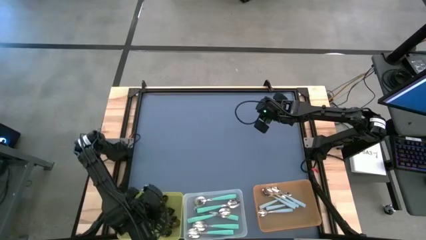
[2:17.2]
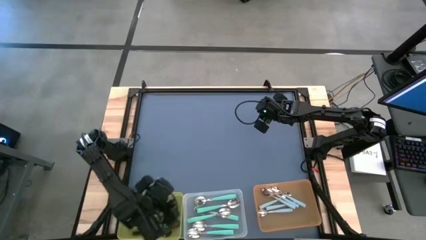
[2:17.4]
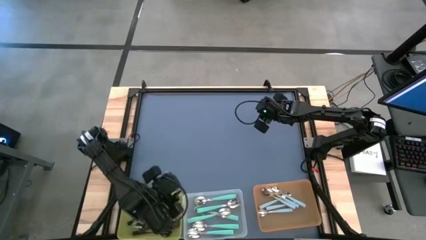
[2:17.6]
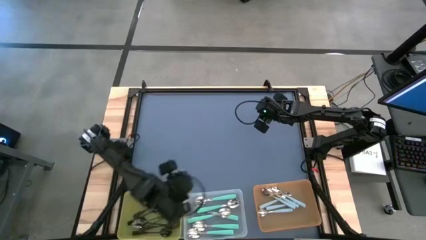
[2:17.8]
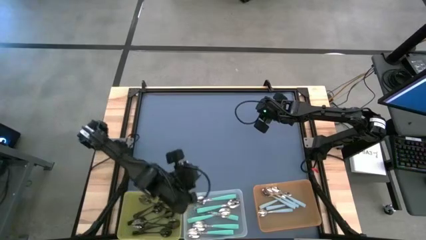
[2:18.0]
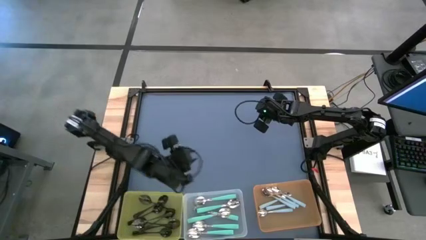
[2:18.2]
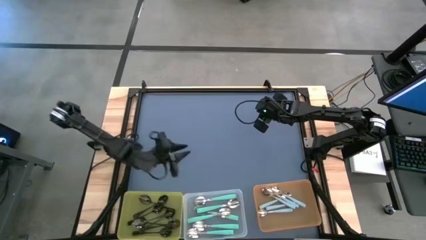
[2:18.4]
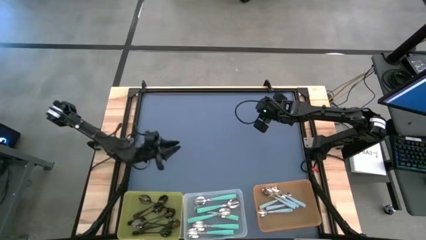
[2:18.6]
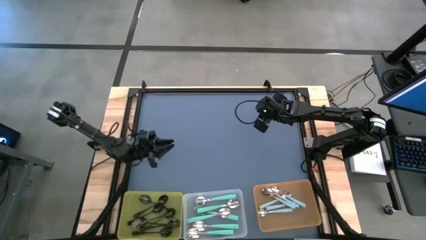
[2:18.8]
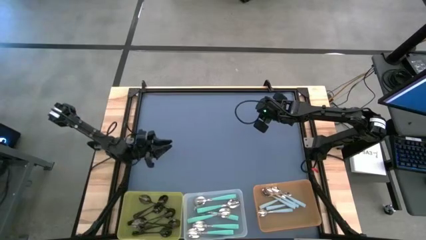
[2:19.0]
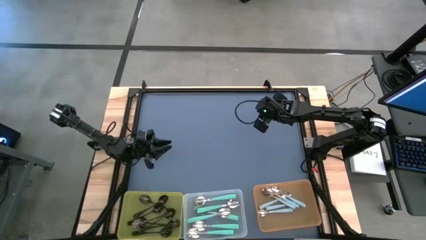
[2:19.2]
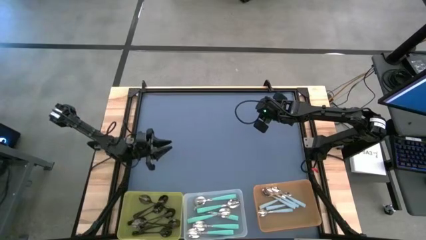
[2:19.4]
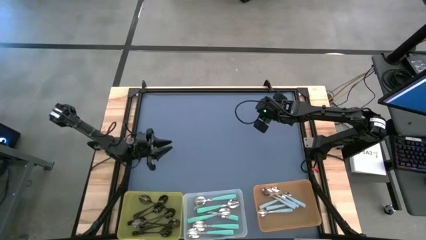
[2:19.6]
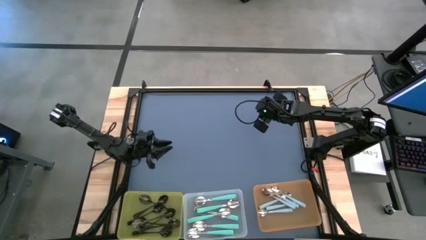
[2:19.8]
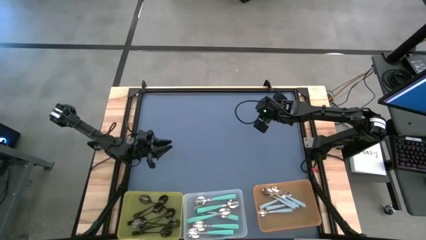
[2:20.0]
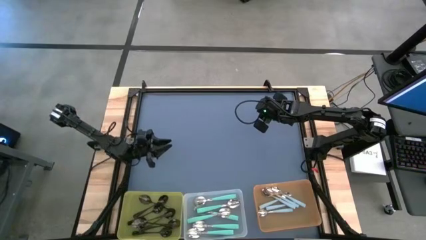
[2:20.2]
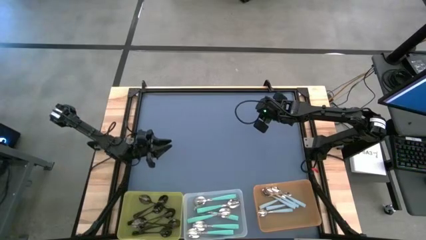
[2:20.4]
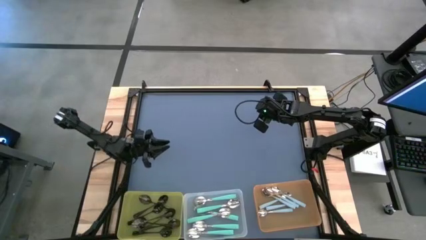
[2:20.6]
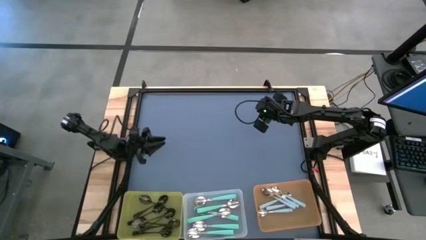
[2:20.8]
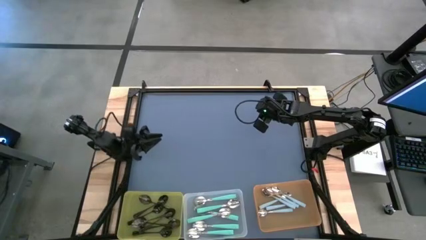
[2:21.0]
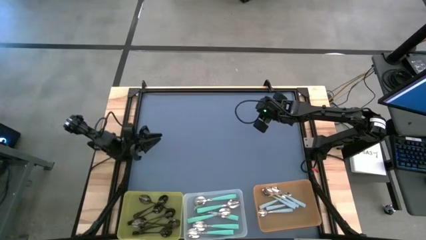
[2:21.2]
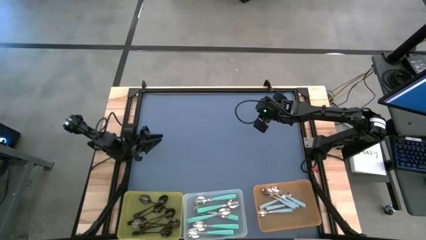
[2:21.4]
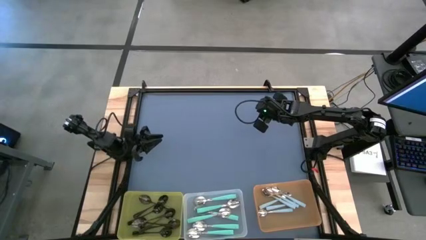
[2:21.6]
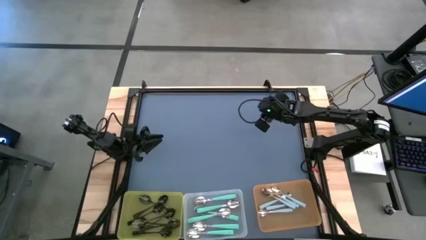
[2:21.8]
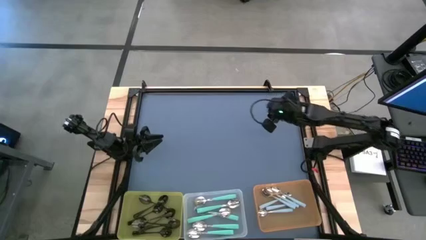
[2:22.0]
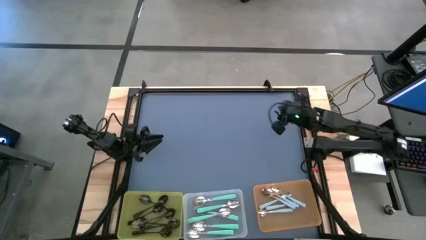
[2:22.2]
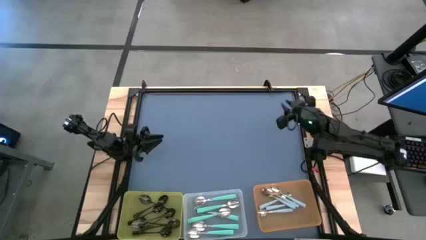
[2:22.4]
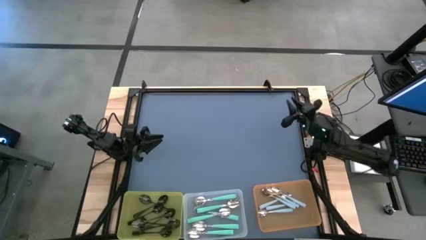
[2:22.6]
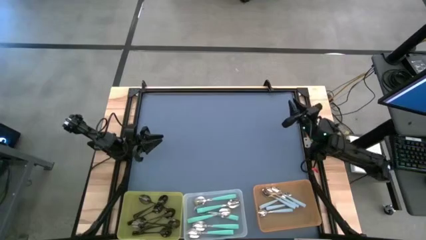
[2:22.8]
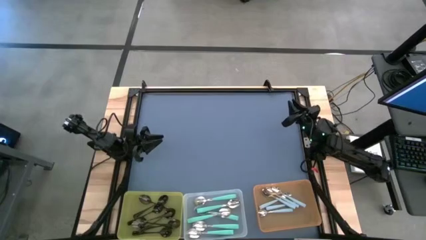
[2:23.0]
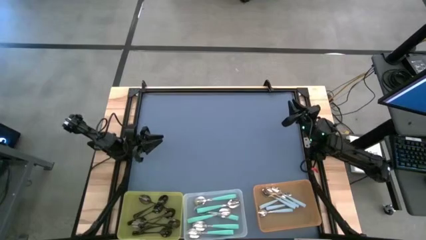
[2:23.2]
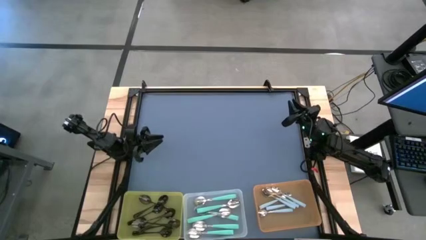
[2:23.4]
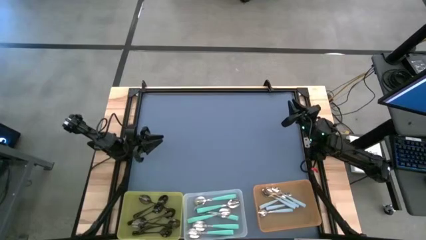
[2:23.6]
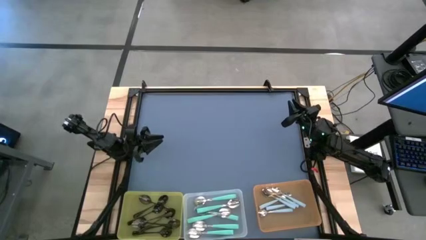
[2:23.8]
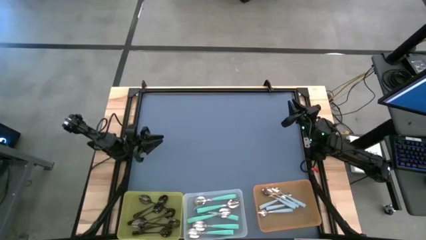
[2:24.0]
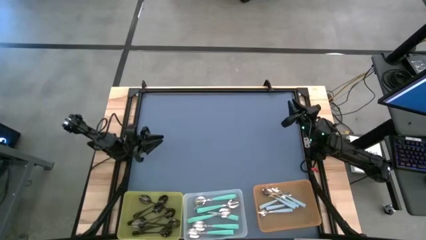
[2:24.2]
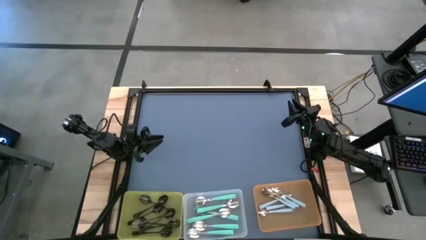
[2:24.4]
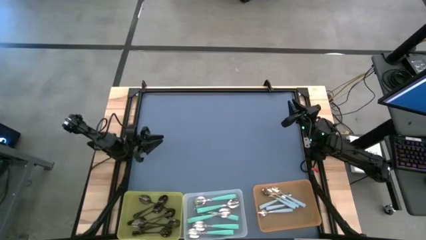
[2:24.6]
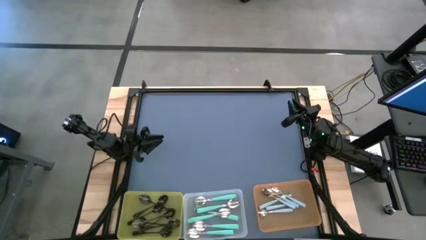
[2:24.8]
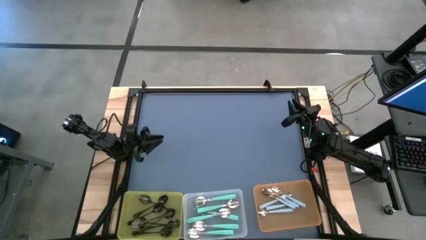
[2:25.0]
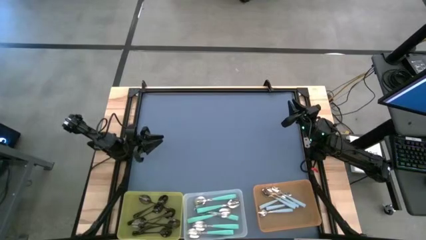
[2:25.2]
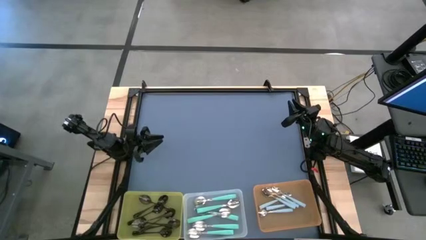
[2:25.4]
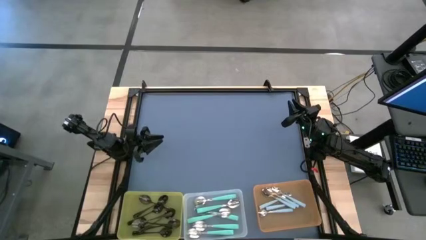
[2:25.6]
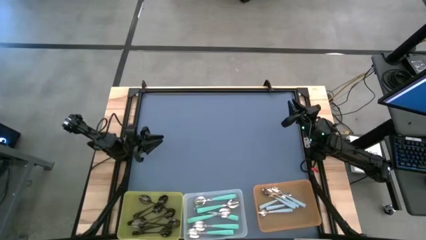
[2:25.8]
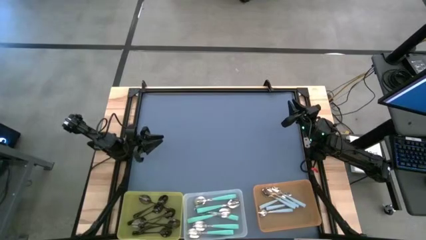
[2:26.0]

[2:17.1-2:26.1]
Task: Sort silverware by color (type)
Return to Home Position

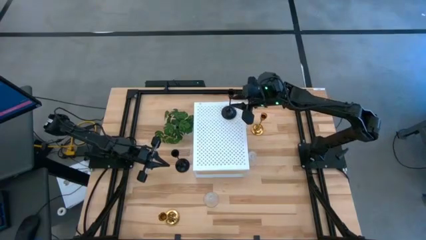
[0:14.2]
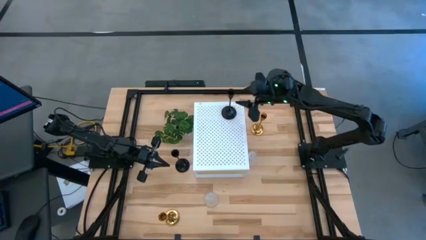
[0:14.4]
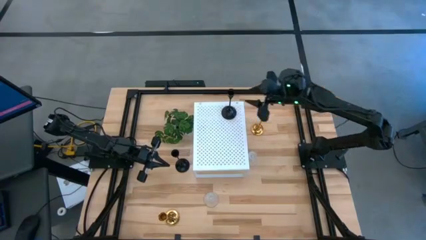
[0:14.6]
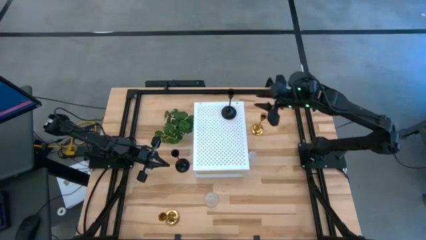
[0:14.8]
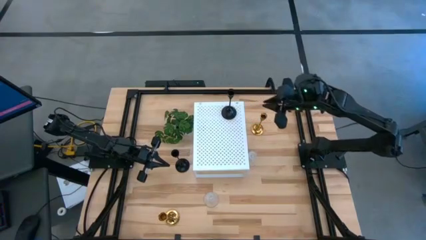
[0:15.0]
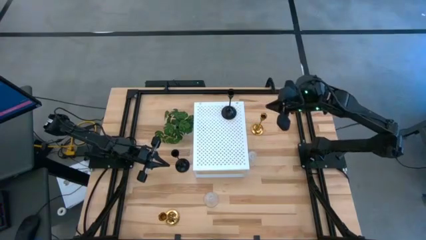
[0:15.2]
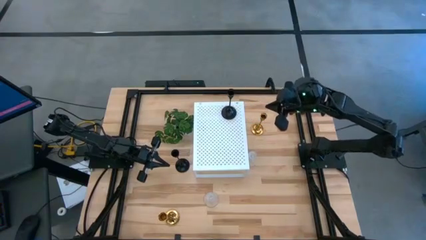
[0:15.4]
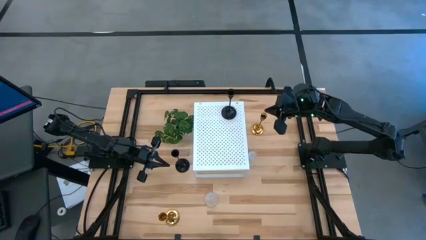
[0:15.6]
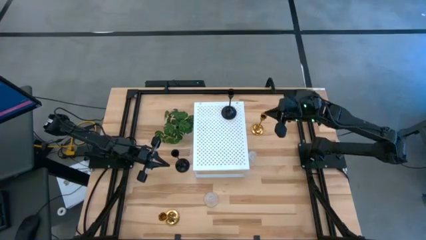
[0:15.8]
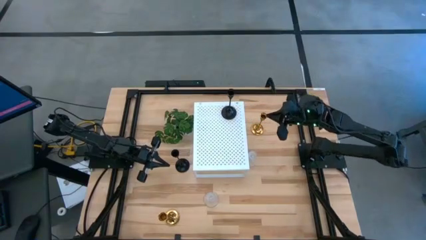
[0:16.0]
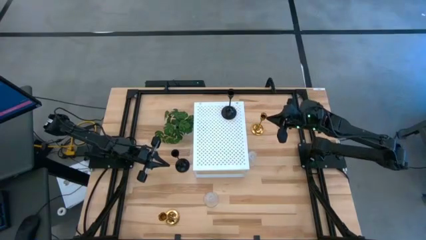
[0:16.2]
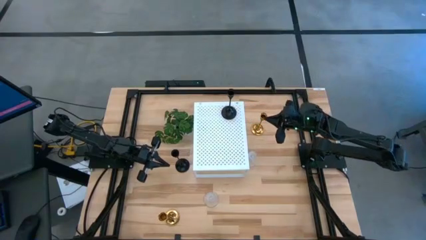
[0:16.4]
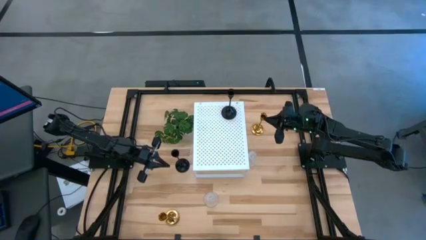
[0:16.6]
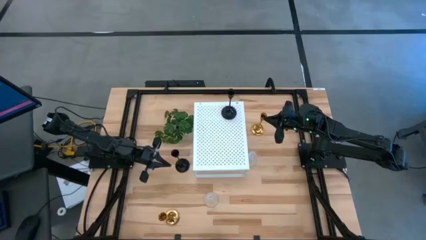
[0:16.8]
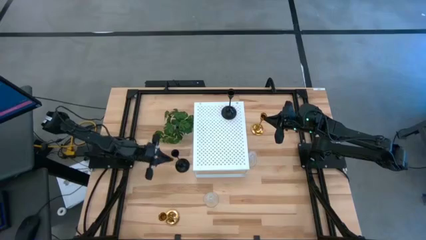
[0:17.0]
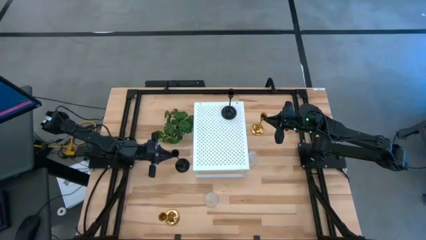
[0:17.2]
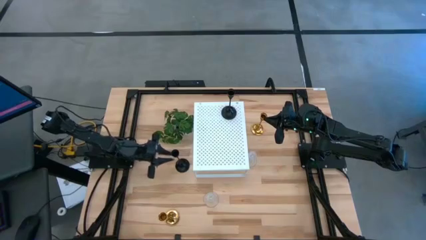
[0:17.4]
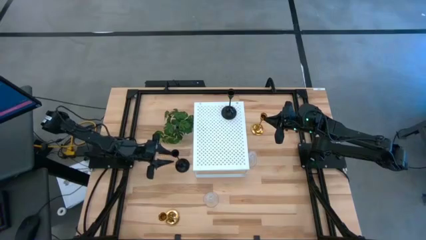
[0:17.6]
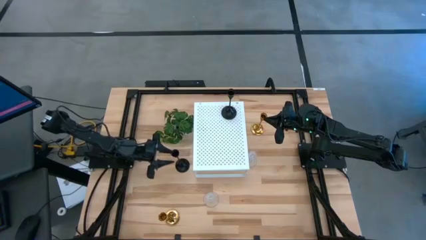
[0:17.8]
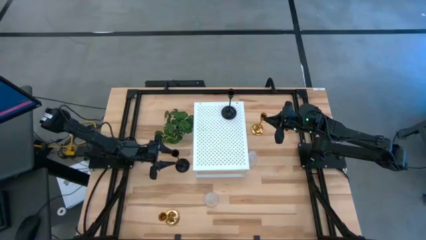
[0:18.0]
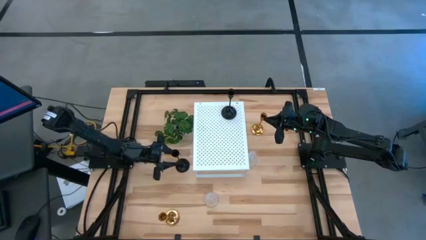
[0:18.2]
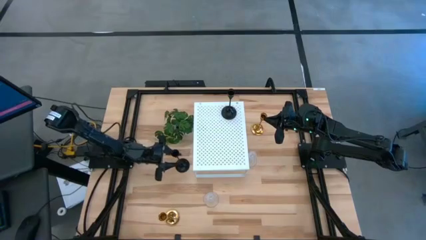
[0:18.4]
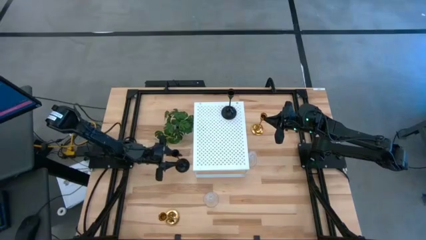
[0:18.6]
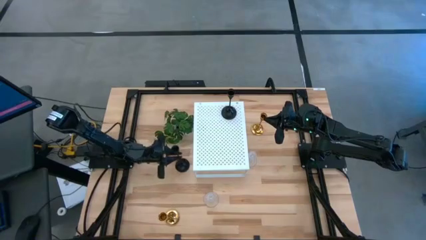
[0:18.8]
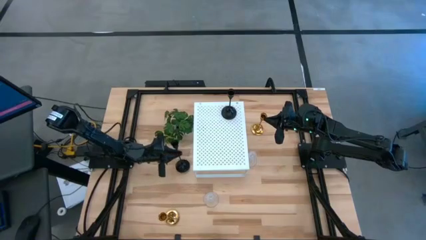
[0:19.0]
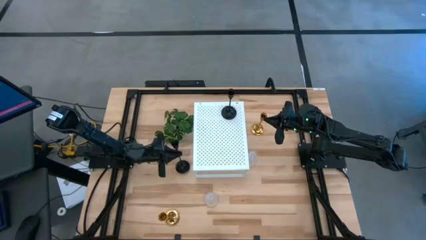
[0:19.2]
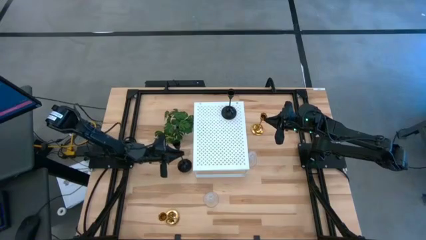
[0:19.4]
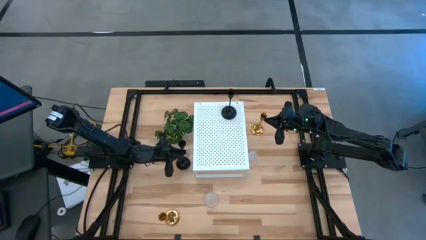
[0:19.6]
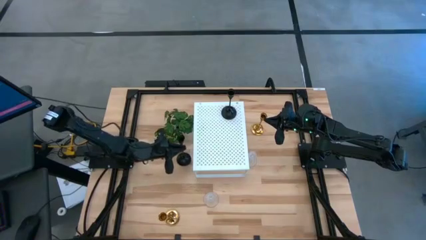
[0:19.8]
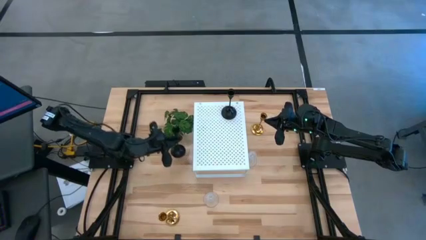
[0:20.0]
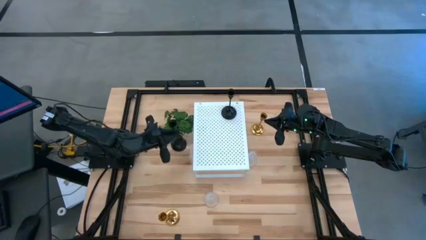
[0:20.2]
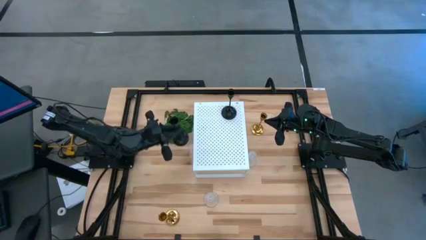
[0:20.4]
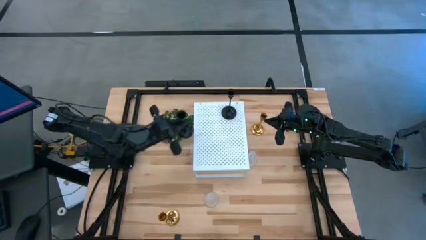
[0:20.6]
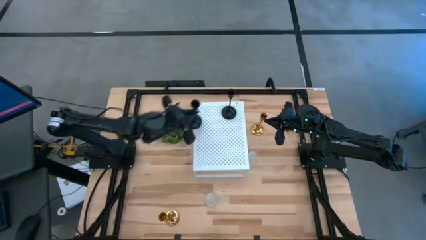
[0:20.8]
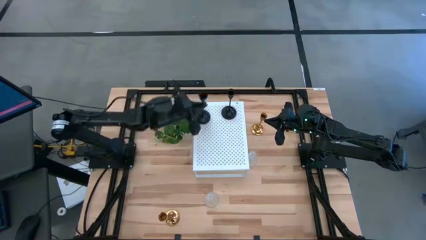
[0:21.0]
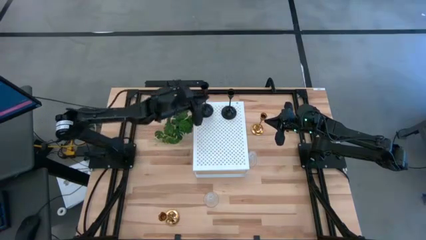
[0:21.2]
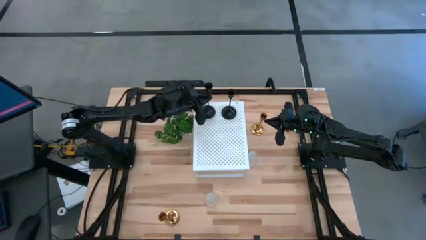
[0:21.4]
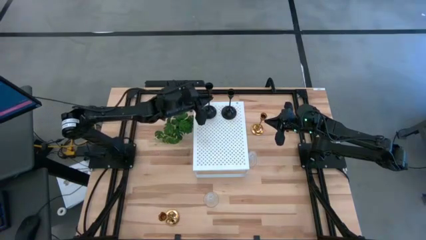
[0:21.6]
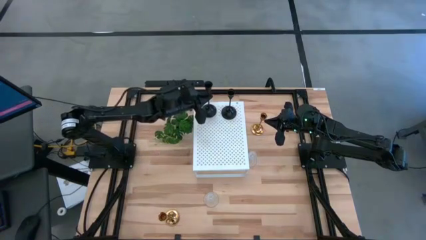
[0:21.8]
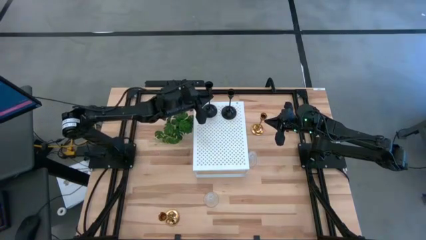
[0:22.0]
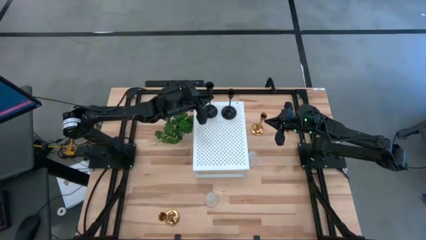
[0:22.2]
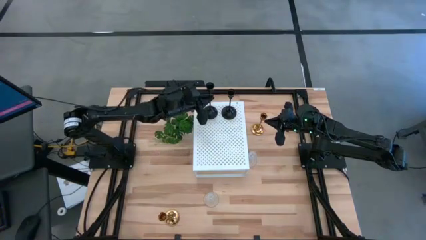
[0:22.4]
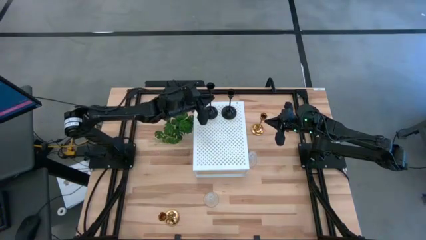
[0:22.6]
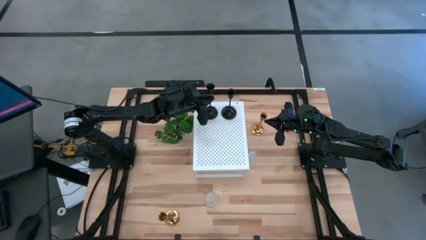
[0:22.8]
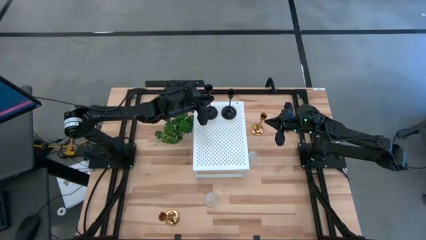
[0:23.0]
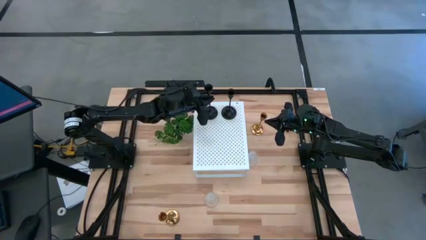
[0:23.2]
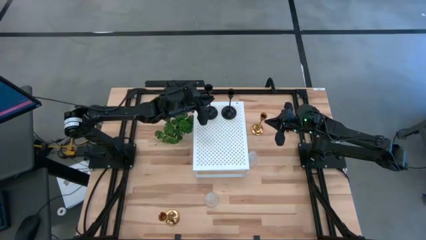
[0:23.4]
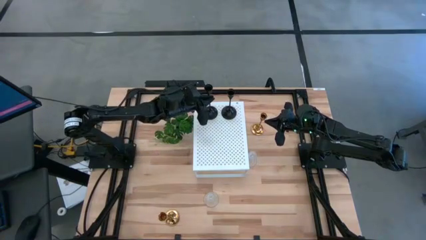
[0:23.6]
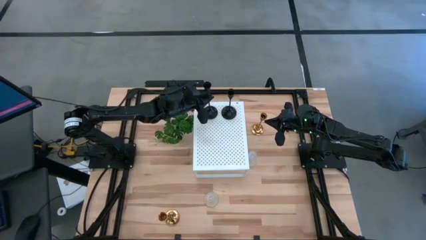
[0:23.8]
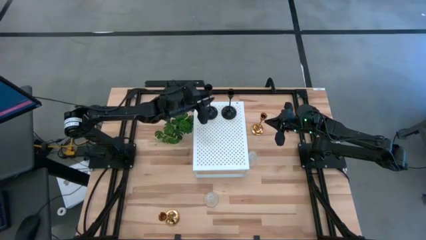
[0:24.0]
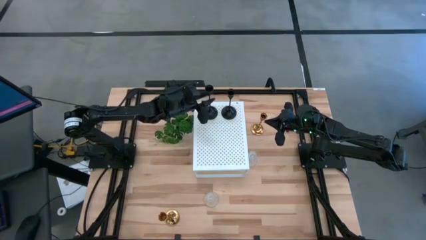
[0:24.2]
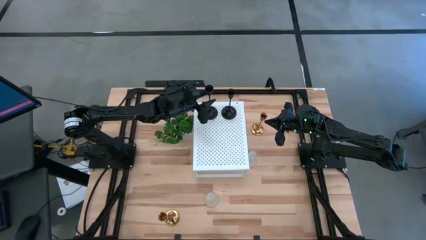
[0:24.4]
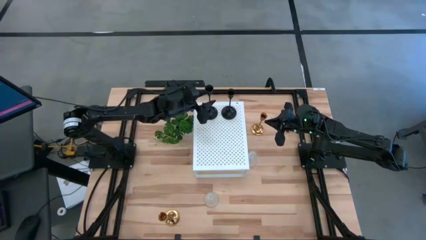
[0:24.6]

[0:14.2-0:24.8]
Task: Pick & Place candle stick holders
Put the black candle holder on the shelf aligned with the other black candle holder
